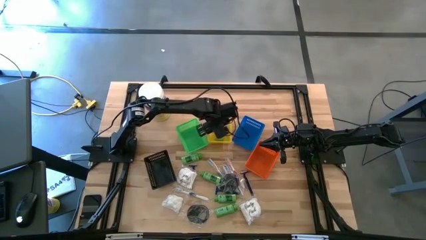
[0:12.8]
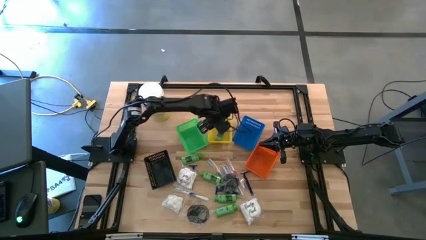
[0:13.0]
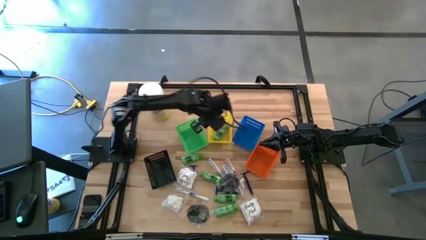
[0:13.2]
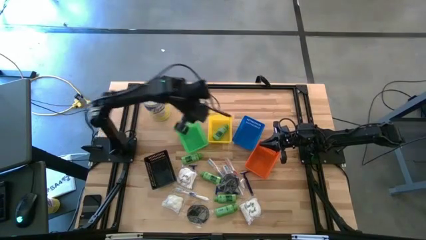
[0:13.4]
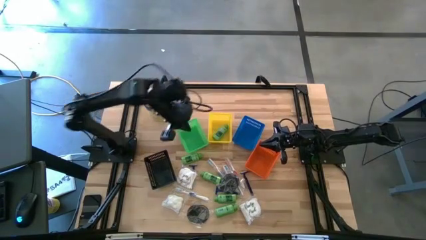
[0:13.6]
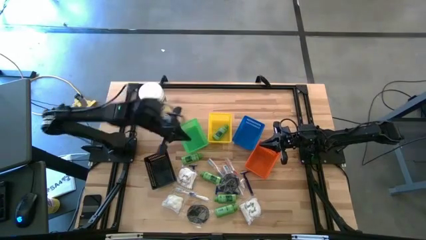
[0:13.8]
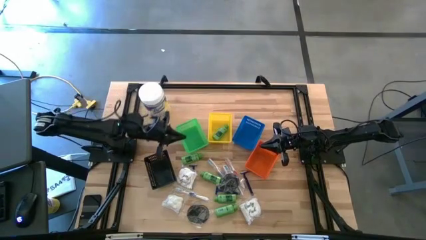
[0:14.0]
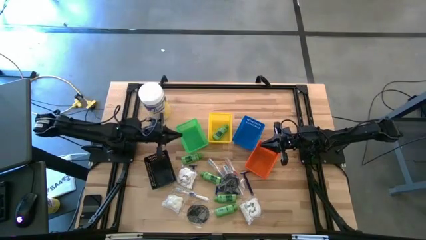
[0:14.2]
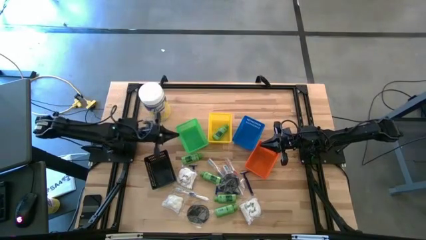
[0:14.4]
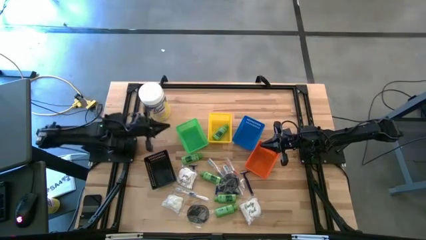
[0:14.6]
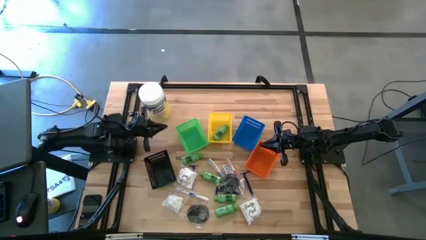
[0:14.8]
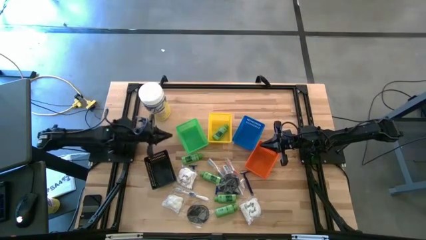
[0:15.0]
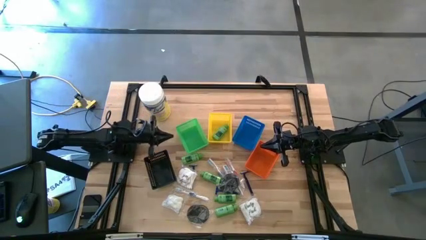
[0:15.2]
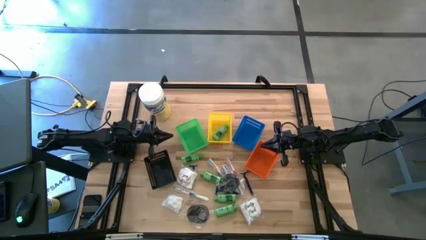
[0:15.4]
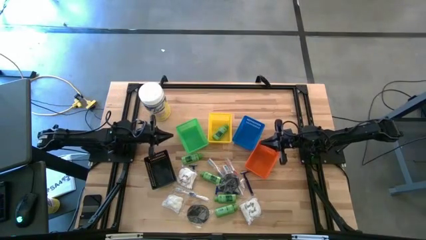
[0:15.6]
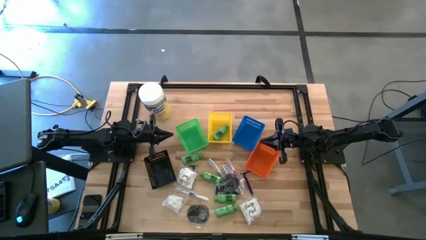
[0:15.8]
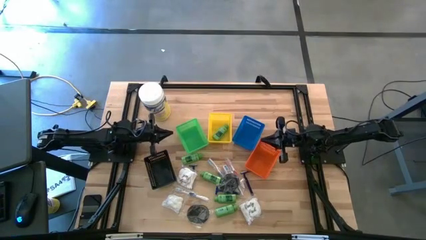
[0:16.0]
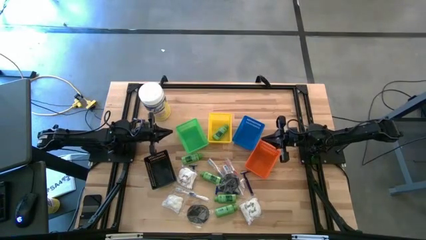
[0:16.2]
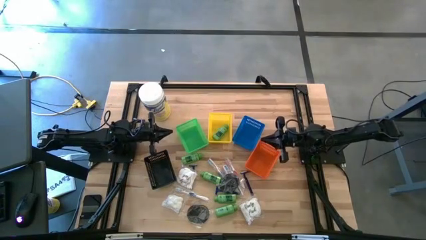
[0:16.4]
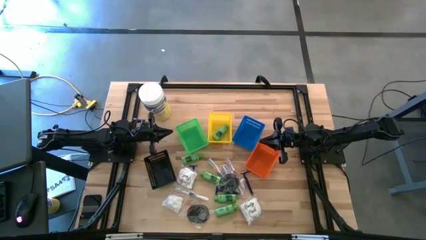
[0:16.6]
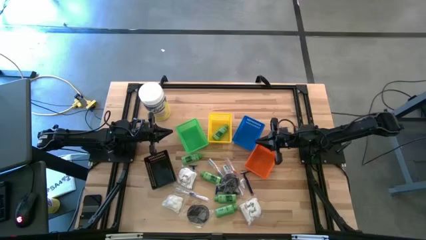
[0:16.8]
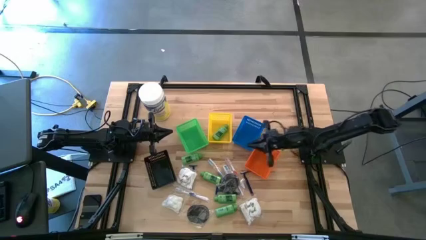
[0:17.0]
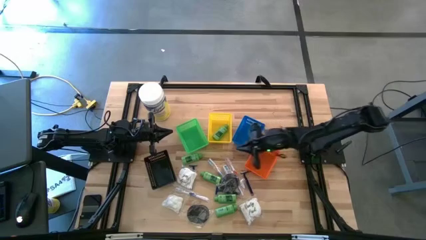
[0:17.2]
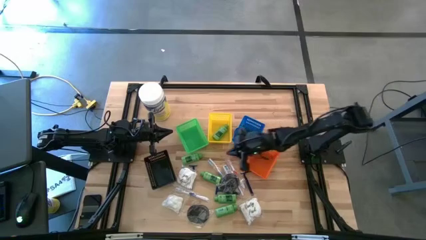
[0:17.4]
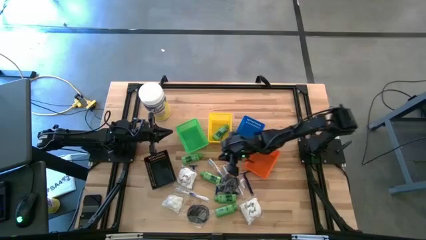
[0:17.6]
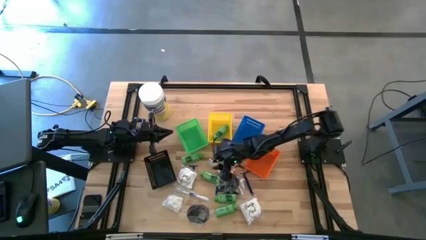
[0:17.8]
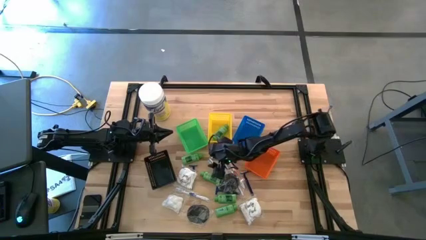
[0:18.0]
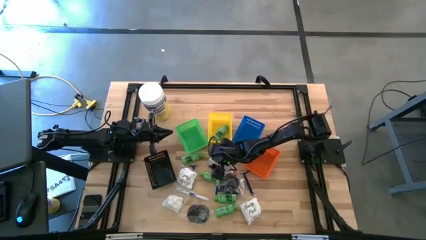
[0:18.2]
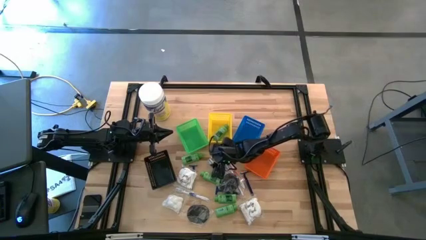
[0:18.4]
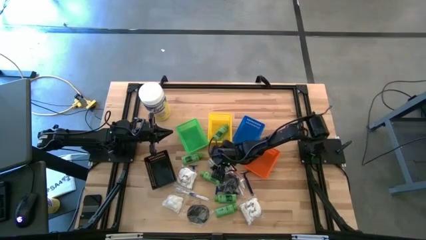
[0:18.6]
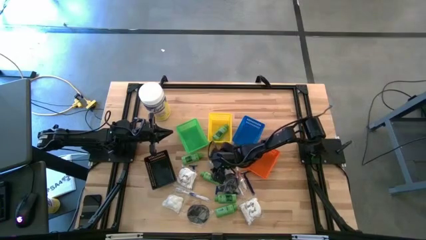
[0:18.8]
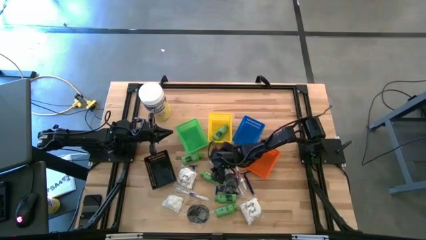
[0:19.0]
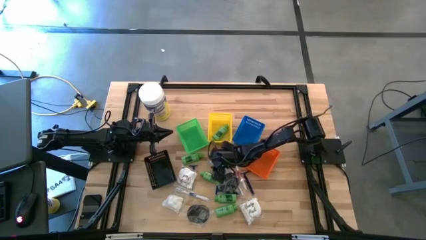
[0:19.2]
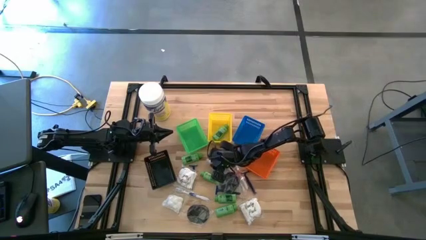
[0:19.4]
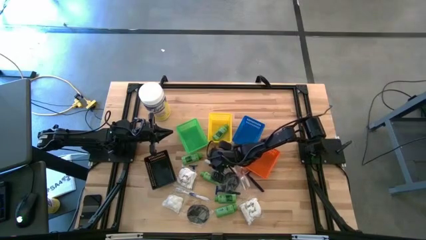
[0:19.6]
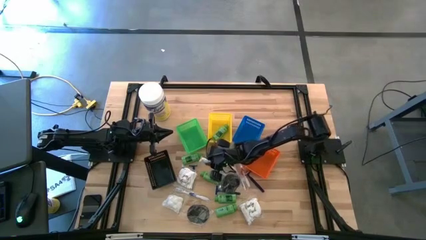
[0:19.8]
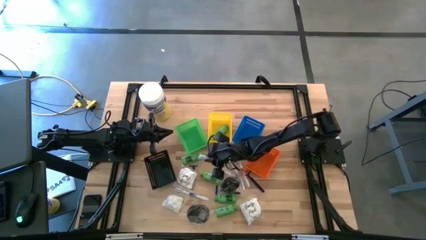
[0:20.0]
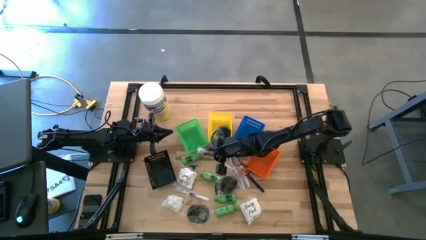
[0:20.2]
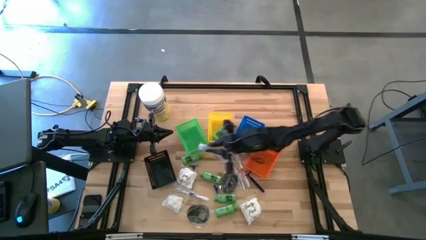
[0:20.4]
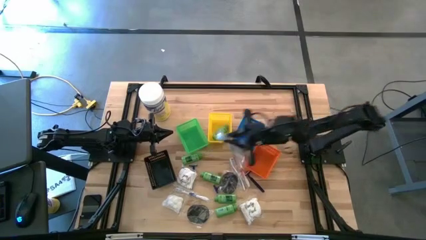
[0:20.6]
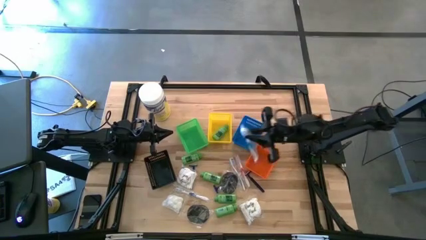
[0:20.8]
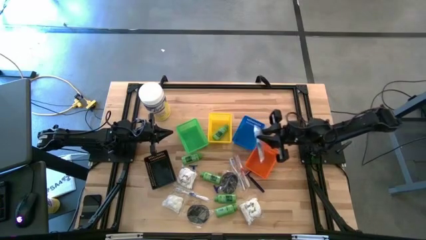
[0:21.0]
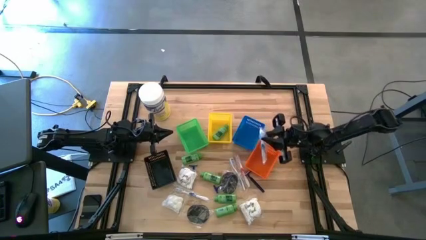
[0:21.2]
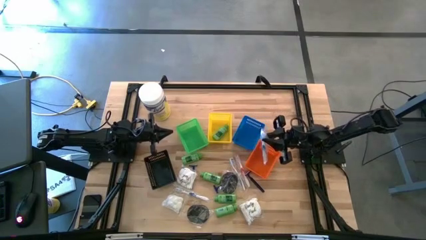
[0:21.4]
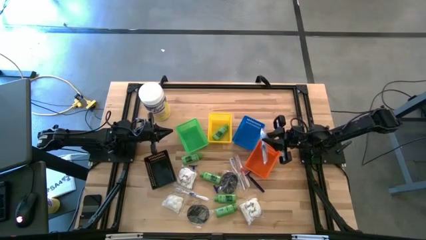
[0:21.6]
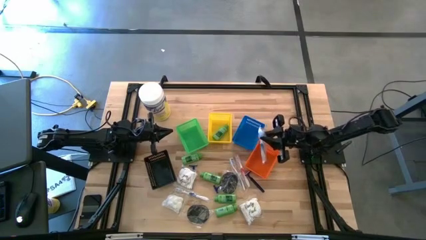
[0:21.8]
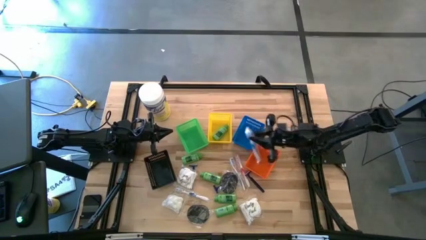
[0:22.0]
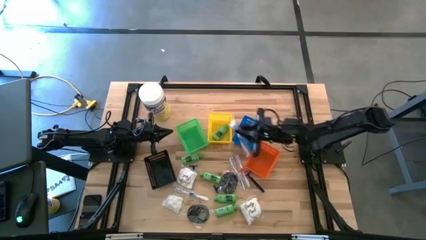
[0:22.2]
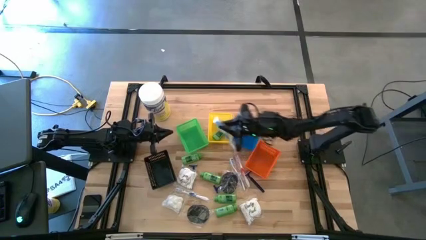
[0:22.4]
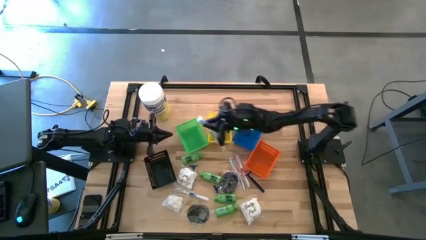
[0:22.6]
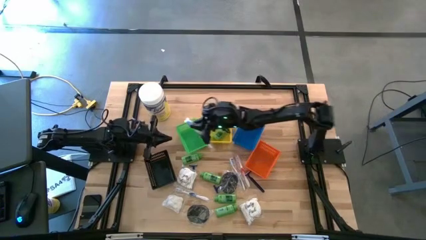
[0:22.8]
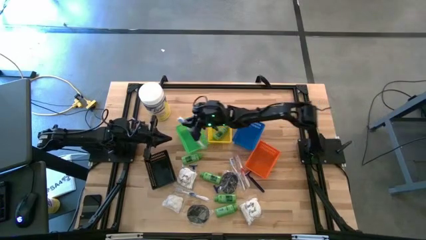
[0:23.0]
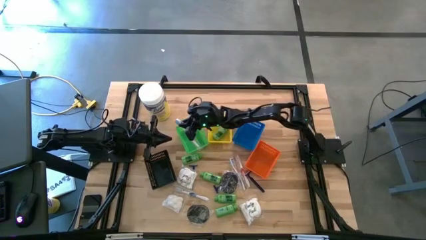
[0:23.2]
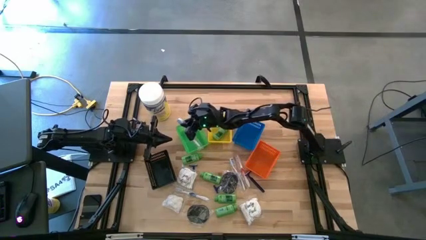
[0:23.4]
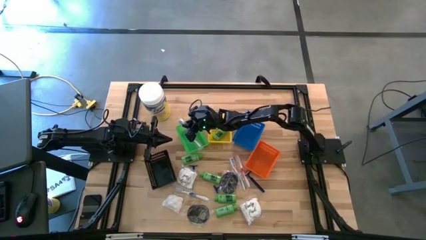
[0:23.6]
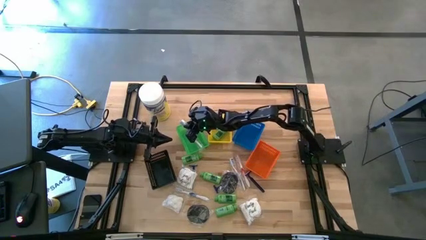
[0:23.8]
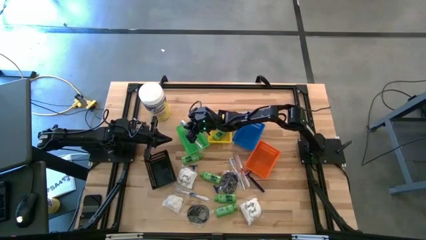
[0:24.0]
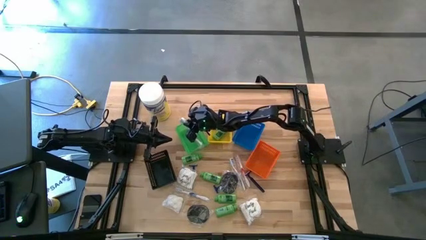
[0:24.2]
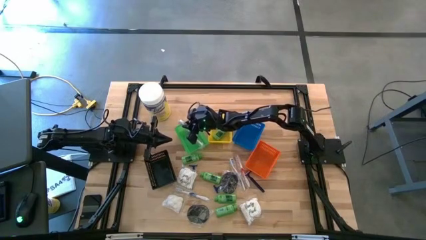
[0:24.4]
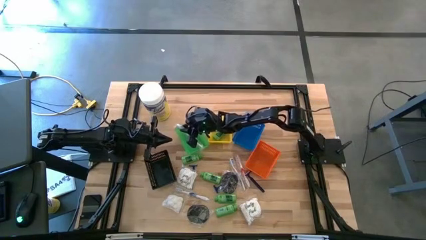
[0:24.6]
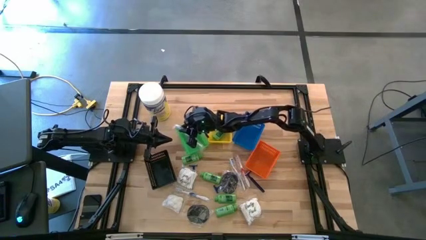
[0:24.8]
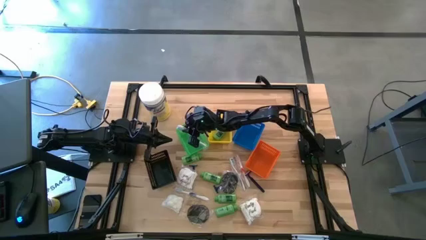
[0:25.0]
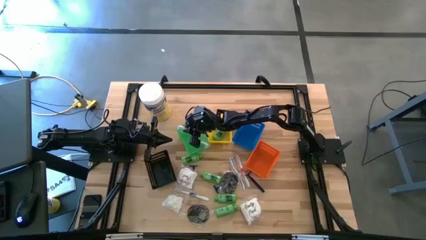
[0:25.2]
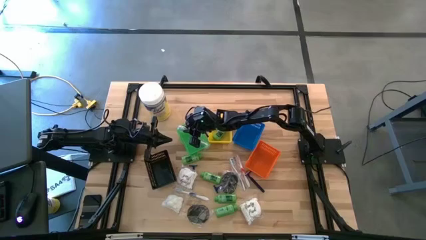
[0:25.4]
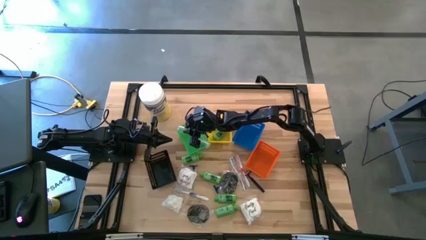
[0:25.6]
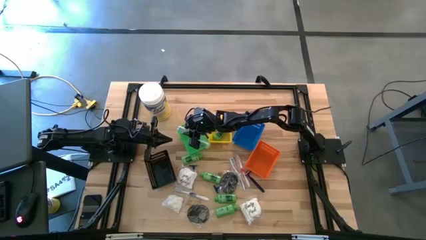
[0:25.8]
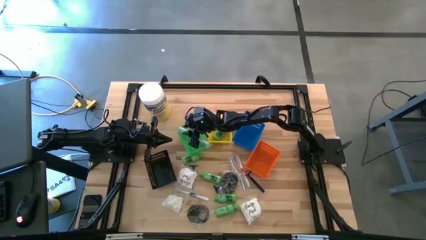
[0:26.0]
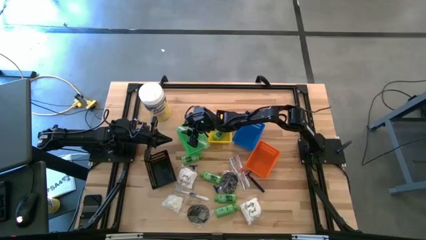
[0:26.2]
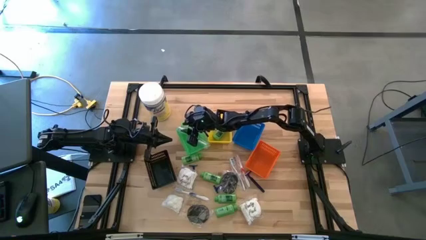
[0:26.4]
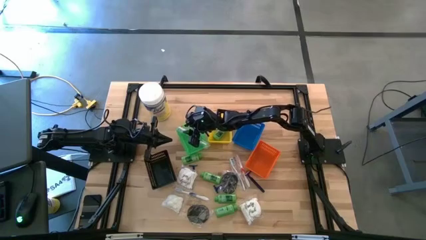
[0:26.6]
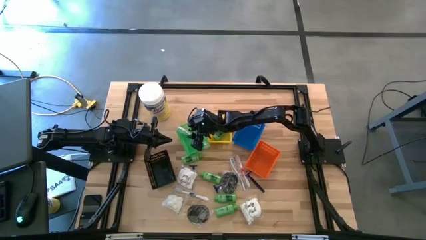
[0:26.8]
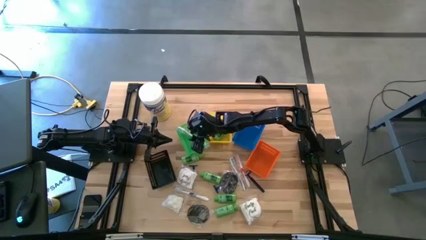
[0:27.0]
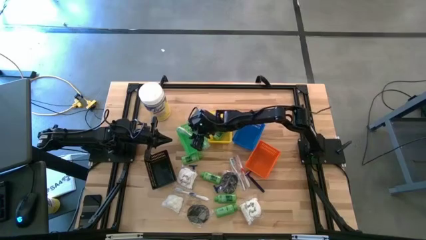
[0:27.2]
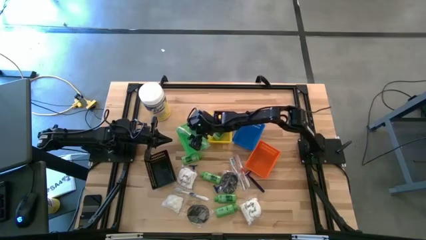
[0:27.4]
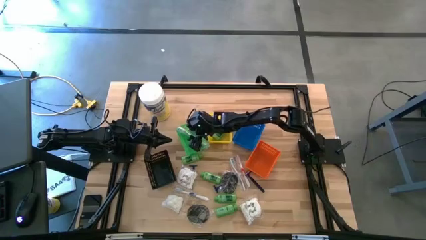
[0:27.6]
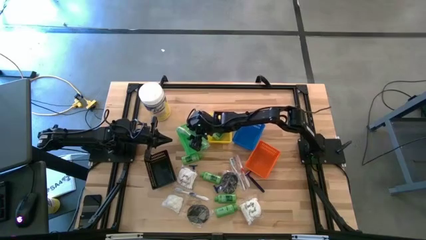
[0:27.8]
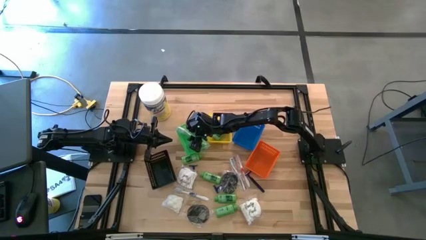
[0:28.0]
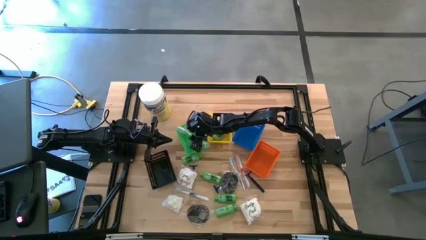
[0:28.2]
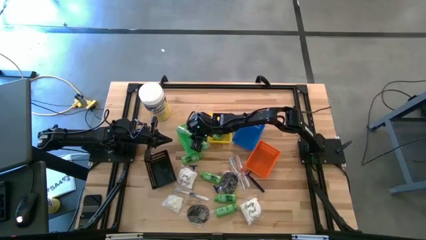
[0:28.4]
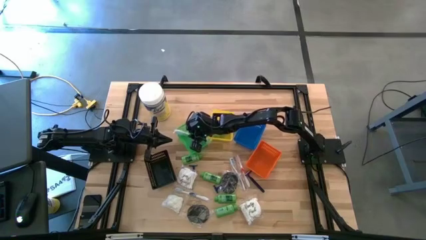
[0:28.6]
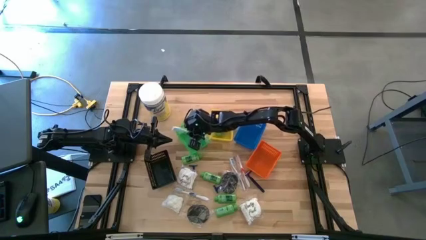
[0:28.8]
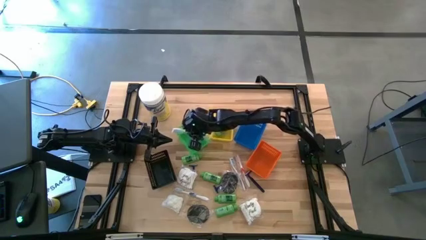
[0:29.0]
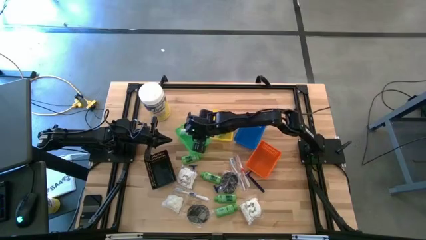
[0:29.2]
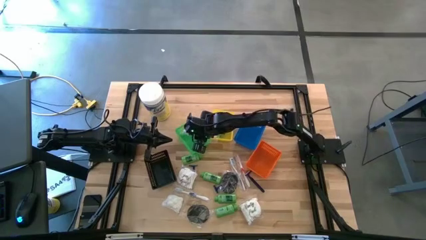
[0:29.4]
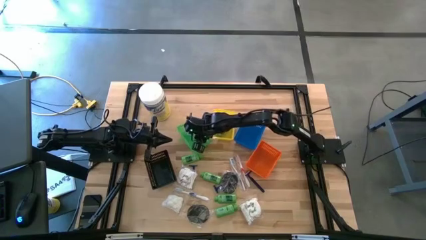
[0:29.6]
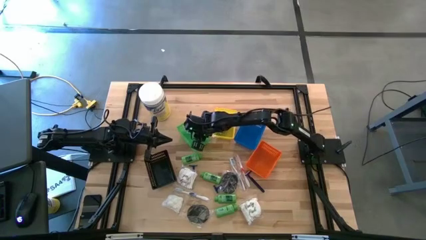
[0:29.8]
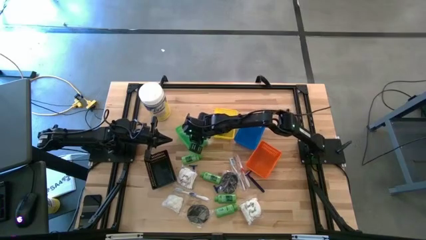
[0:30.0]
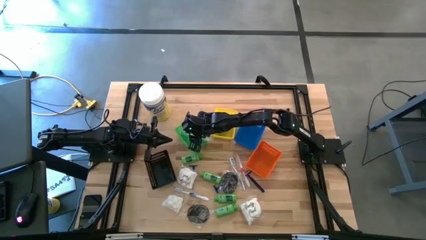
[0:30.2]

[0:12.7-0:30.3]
Task: Pick & Place Travel size toiletries
Put the blue toothbrush into the green bin
